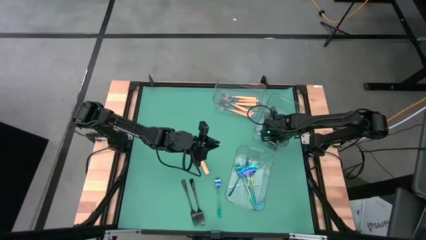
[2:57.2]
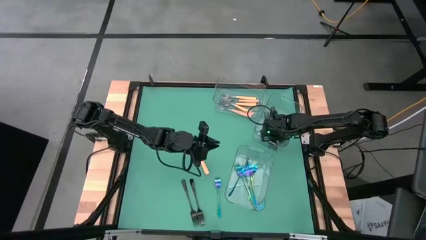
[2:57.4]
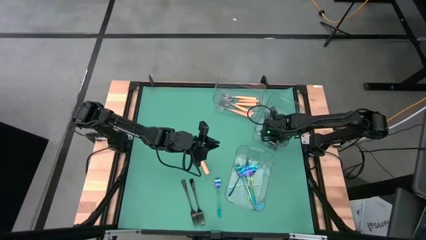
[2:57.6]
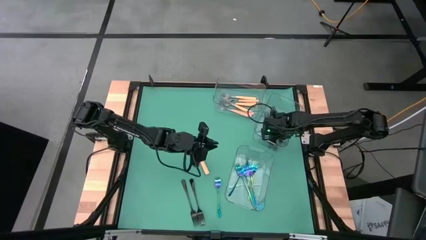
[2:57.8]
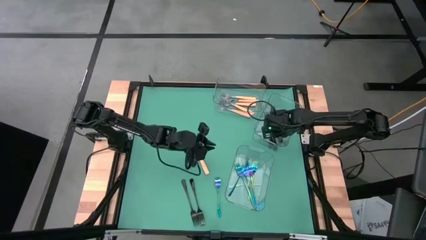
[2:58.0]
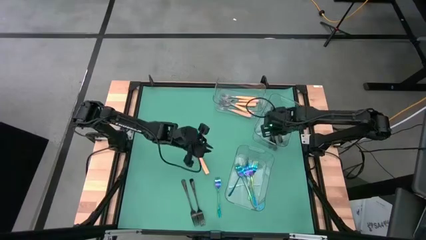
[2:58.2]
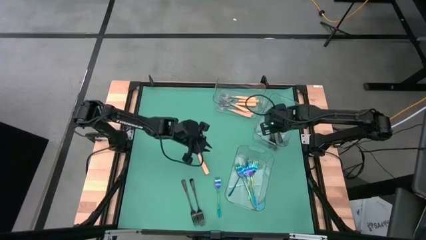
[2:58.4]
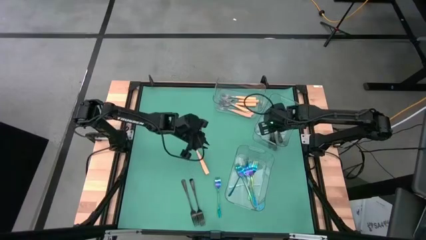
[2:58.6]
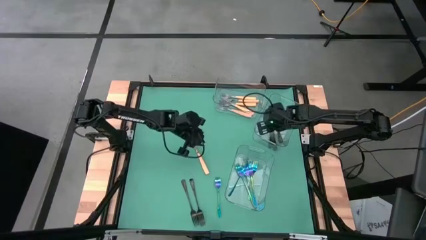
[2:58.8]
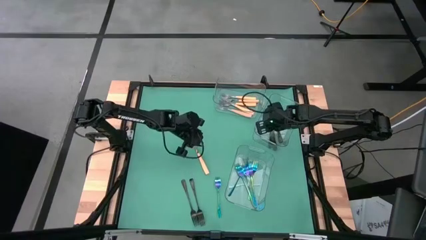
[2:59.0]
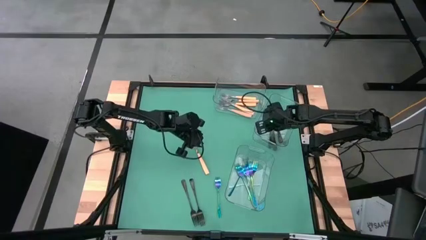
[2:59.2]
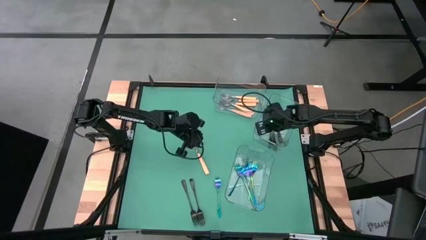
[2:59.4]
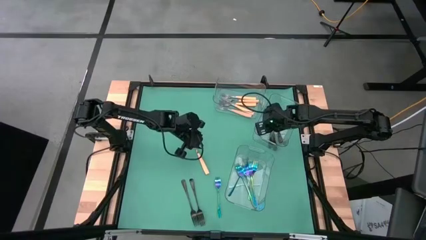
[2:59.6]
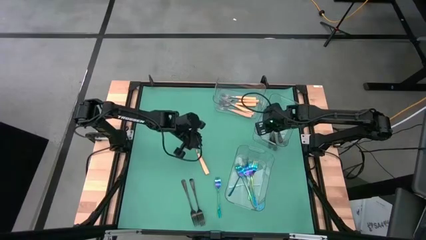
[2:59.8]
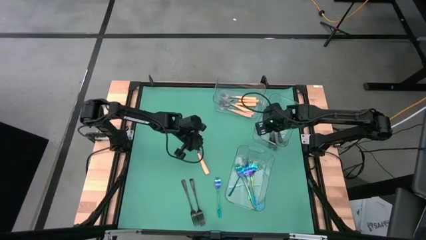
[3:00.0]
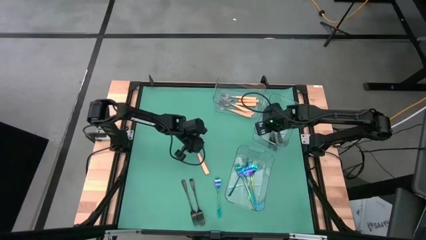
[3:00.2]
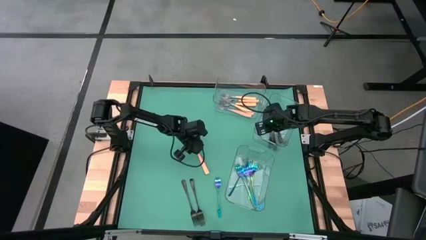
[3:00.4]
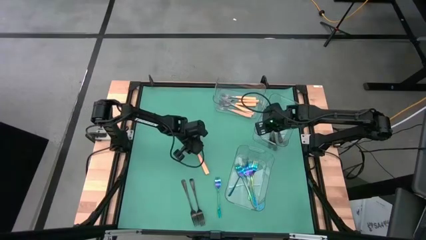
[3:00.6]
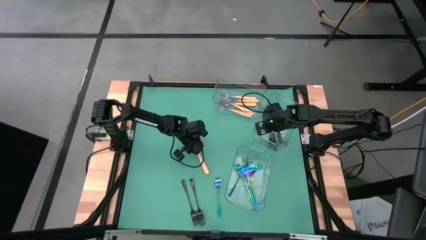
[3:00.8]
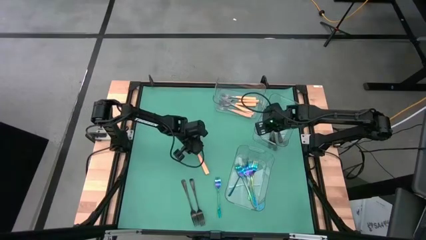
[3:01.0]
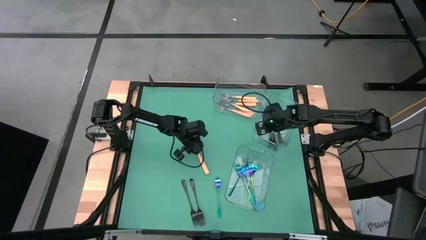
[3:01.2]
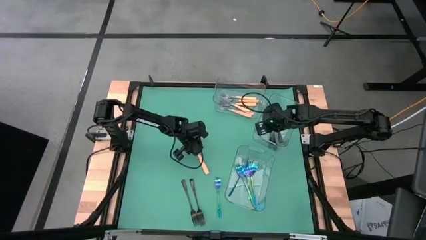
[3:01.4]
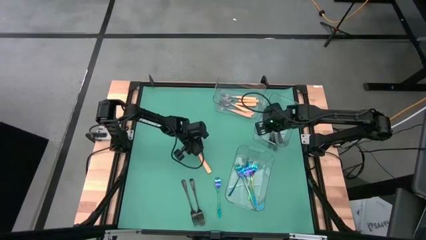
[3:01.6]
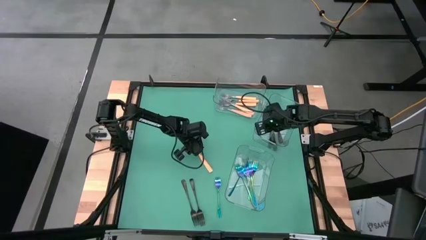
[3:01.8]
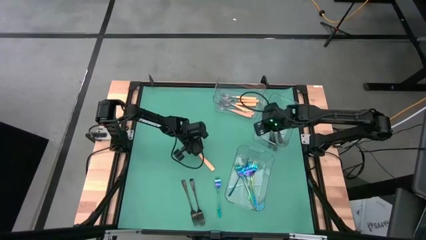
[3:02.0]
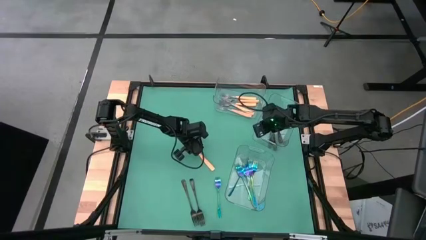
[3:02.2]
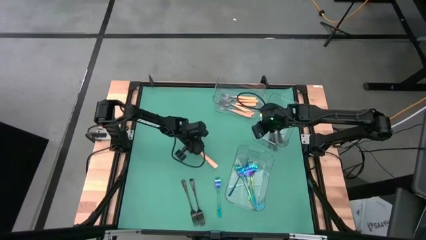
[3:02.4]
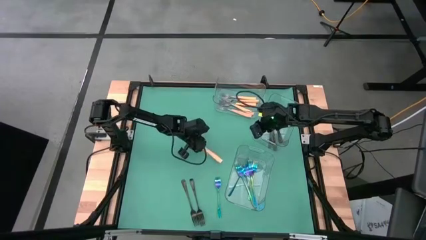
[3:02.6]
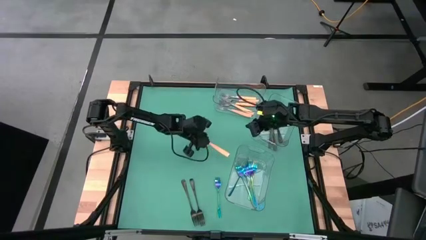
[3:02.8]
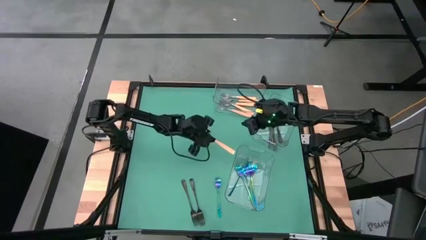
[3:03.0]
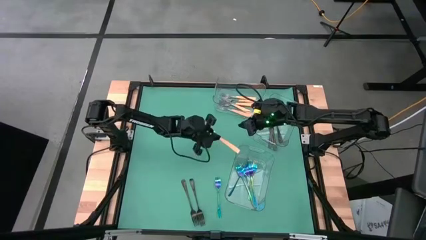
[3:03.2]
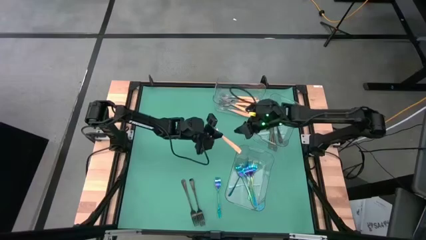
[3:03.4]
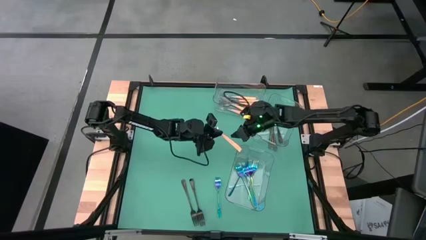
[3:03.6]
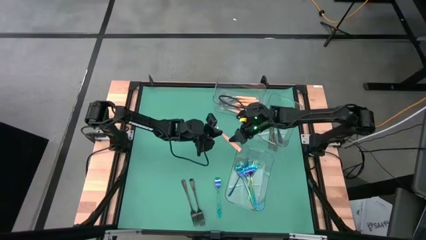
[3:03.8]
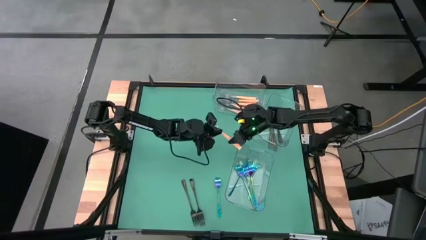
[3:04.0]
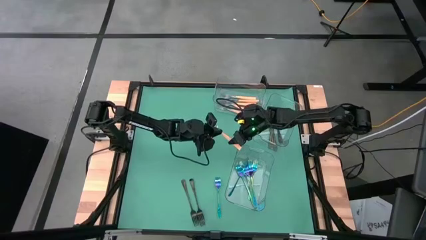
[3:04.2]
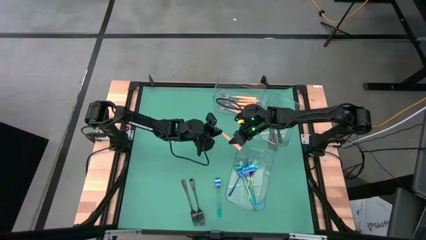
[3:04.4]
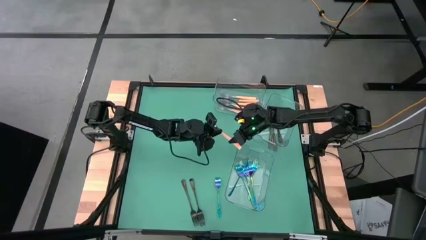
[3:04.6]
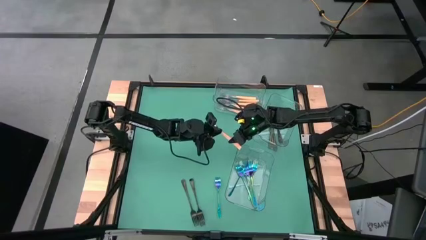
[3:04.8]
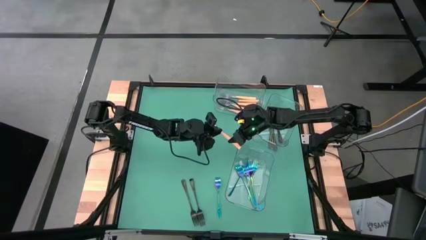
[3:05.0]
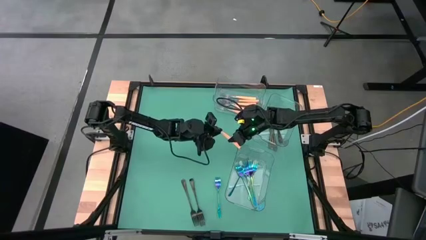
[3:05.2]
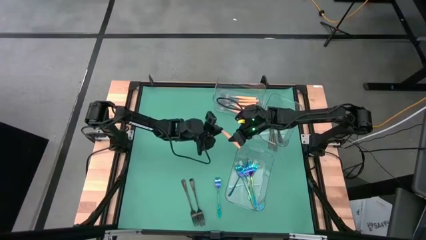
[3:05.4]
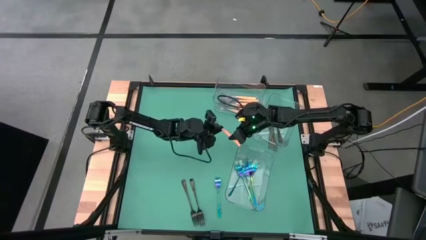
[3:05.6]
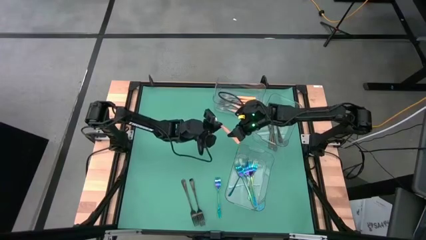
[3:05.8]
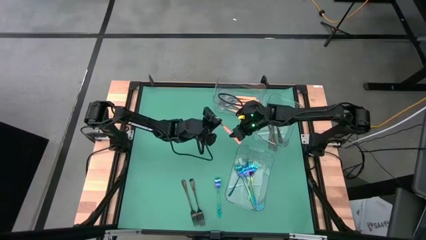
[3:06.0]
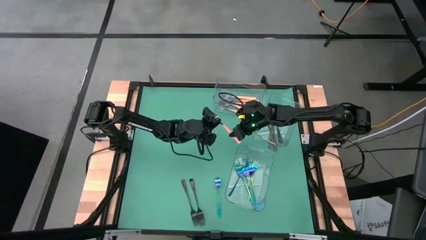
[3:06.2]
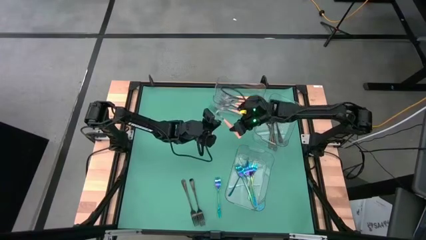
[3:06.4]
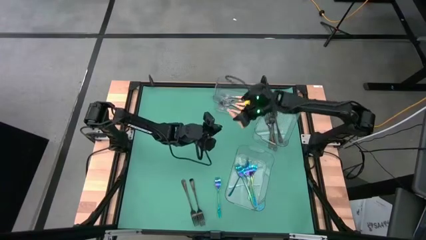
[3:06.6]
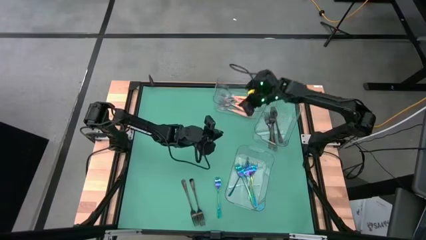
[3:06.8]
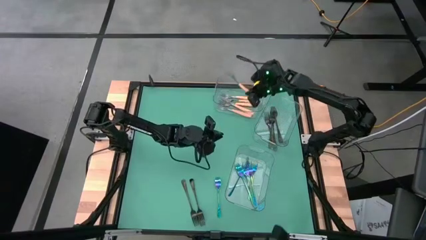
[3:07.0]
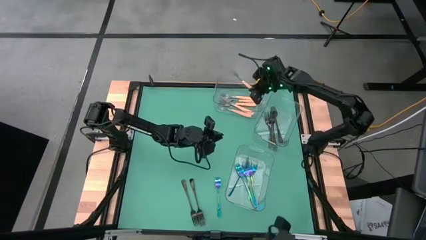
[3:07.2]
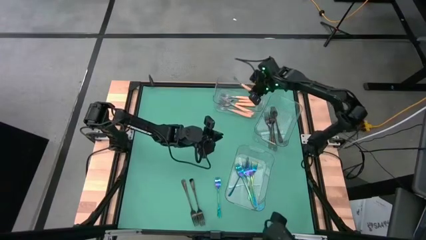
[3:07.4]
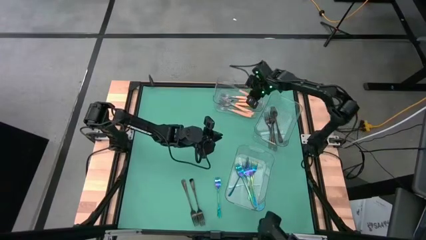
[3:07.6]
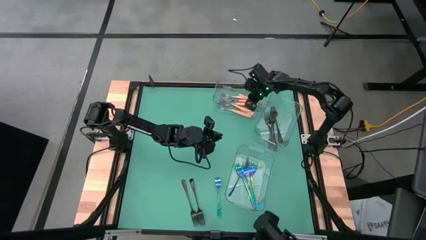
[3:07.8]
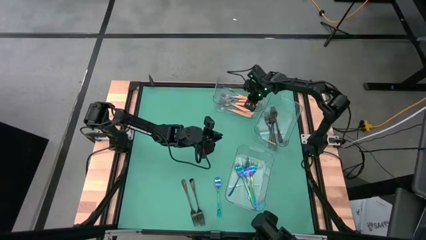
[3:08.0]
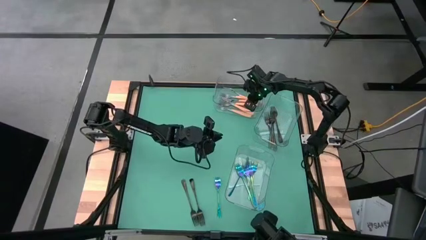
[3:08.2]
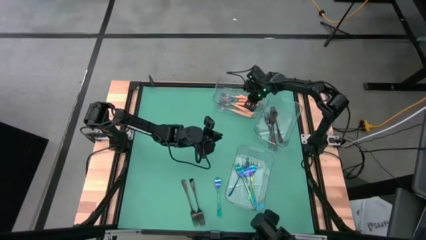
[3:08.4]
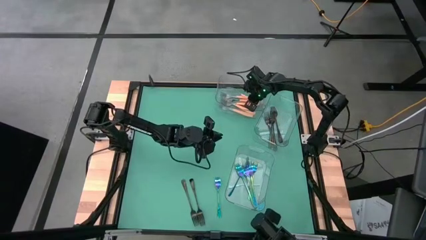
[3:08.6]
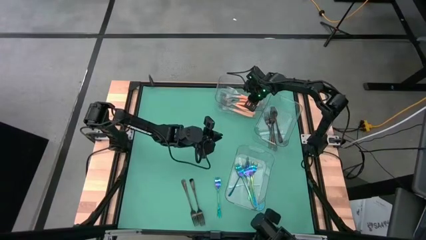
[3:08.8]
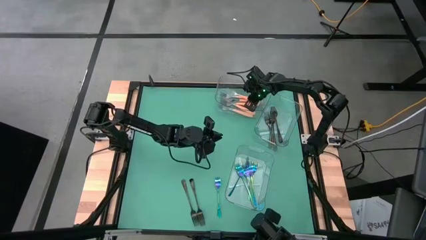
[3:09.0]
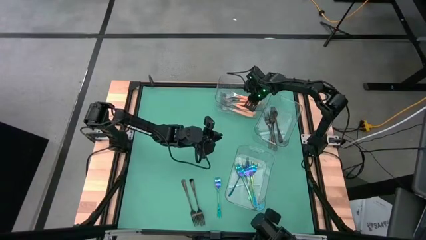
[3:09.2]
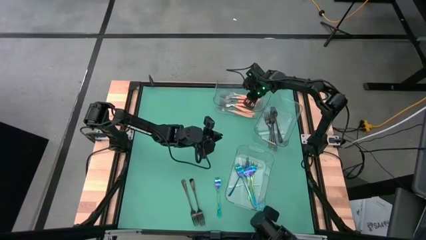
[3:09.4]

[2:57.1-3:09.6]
Task: Sort silverware by color (type)
Put the orange fork into the top transparent bin

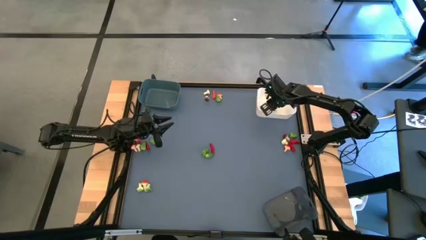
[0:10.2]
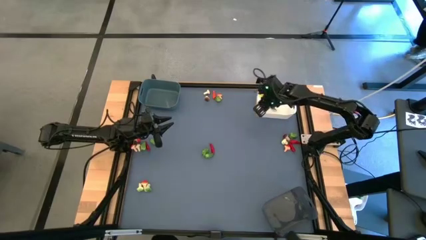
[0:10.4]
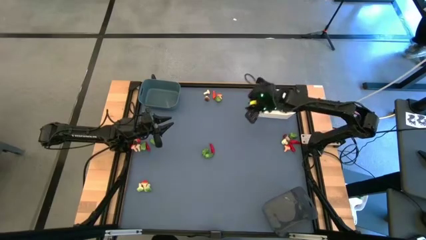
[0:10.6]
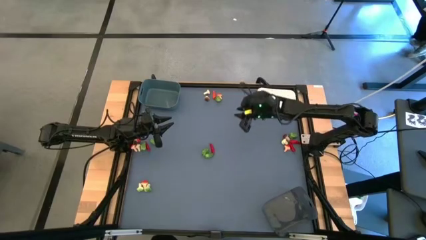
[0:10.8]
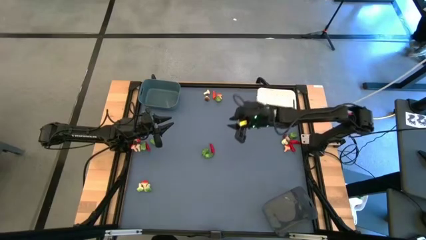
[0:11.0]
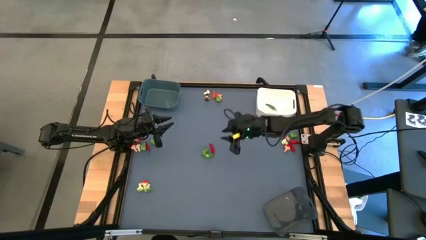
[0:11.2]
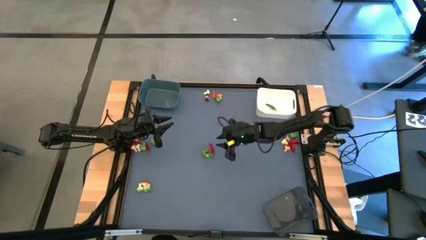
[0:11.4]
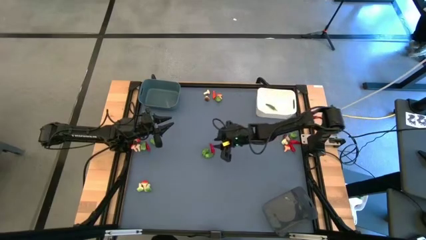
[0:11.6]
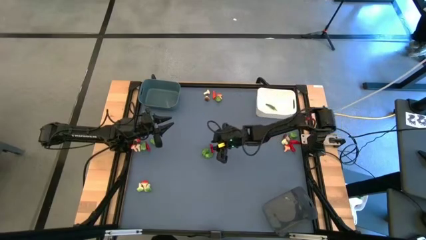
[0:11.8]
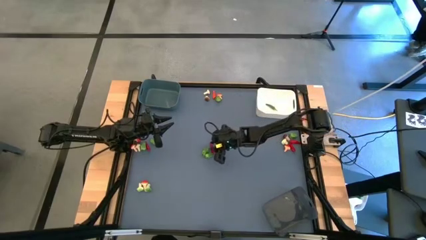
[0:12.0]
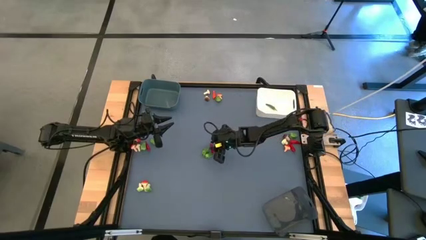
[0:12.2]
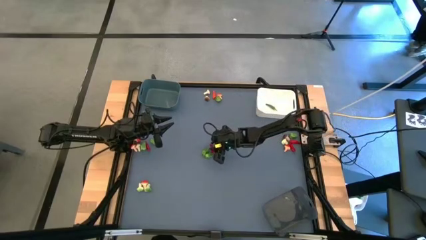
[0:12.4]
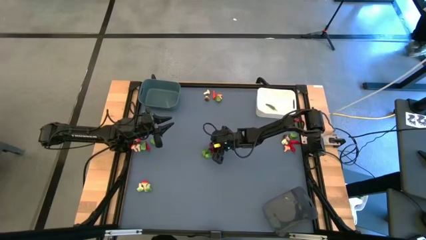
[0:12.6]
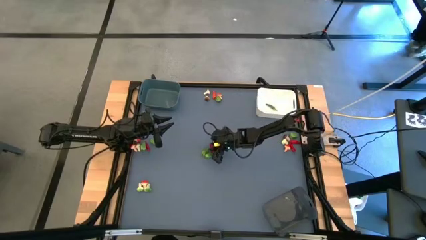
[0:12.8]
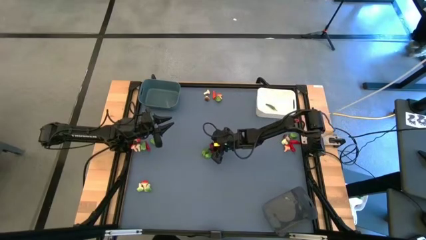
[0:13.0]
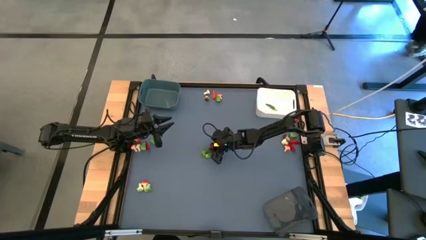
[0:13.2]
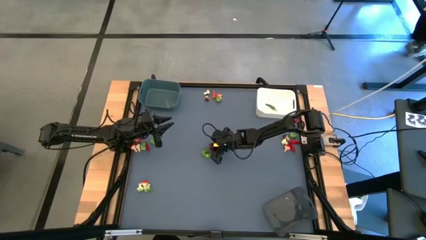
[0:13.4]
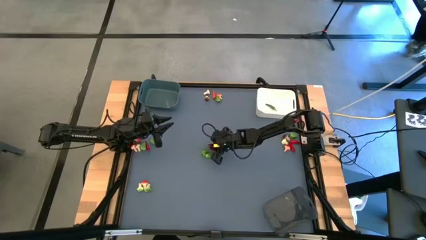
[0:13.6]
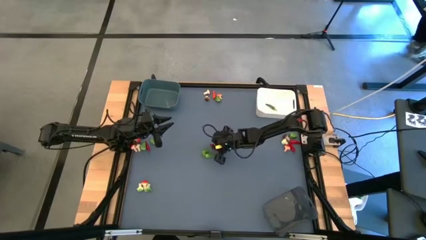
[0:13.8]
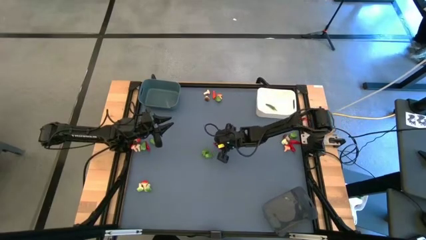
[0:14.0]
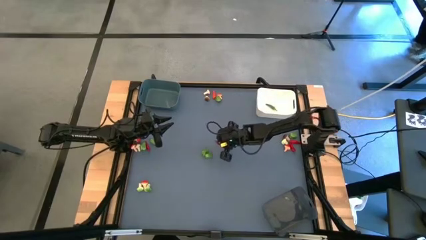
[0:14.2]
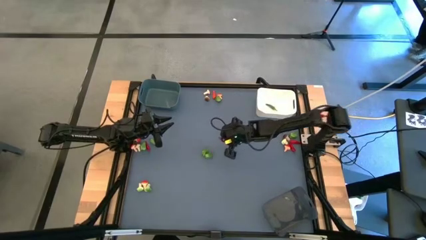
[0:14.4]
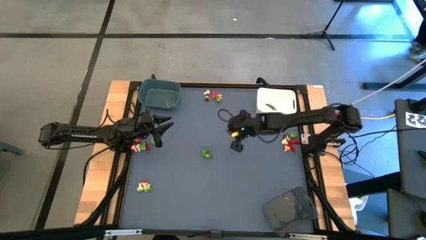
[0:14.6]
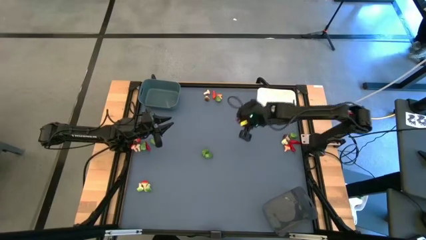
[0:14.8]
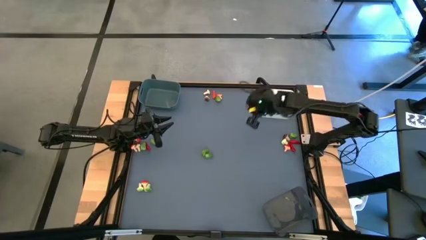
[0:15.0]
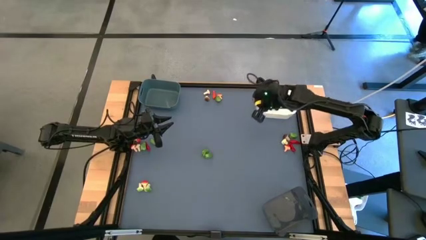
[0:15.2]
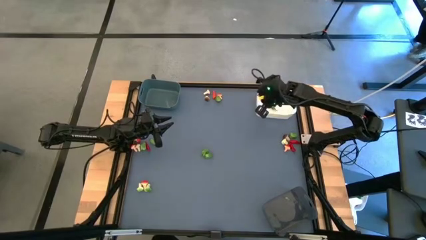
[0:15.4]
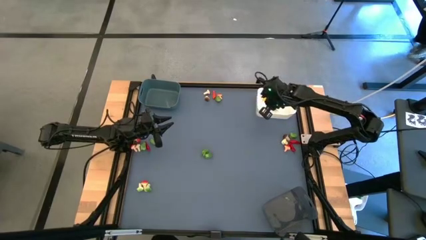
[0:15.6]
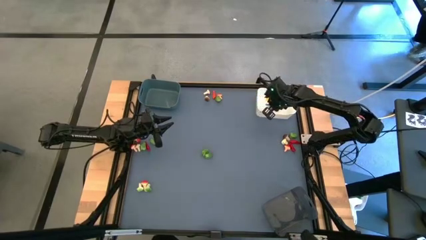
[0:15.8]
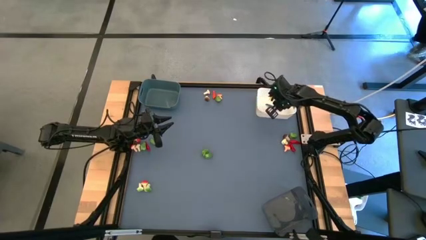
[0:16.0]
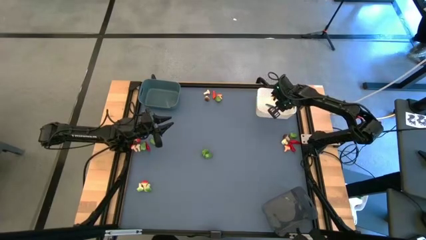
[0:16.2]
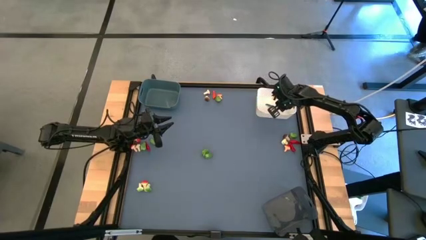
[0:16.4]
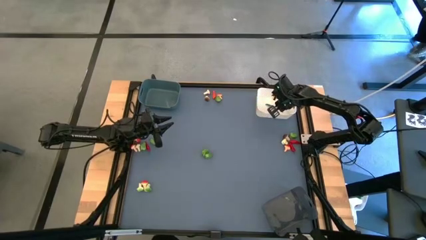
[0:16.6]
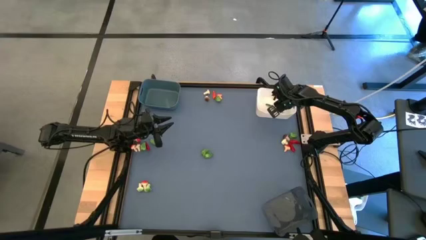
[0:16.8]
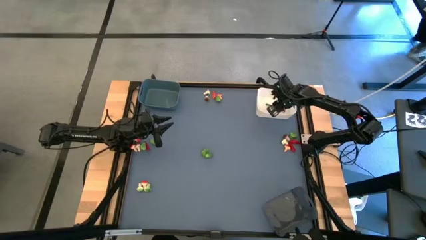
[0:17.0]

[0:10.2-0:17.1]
Task: Sort produce into baskets
Put the red chili pepper into the white bin
